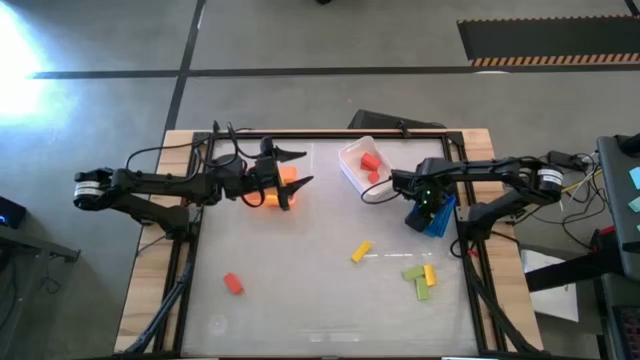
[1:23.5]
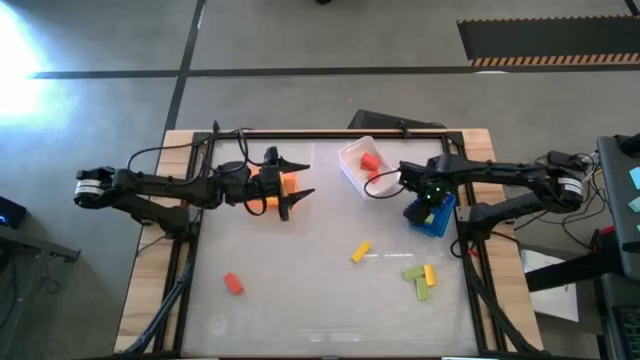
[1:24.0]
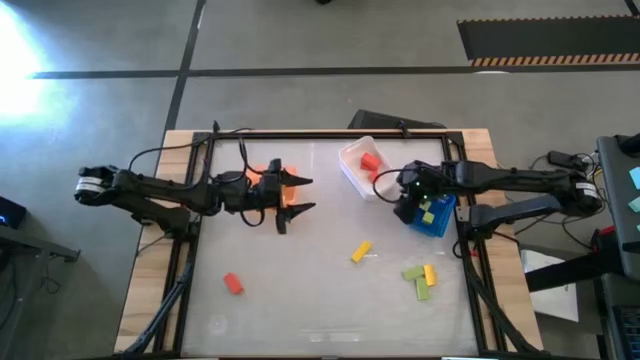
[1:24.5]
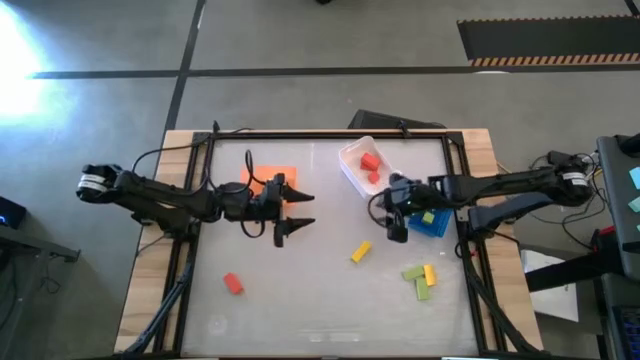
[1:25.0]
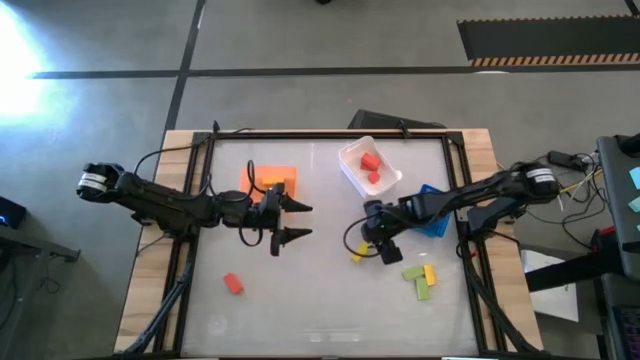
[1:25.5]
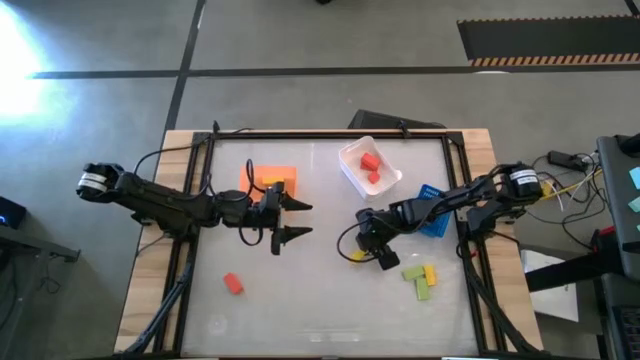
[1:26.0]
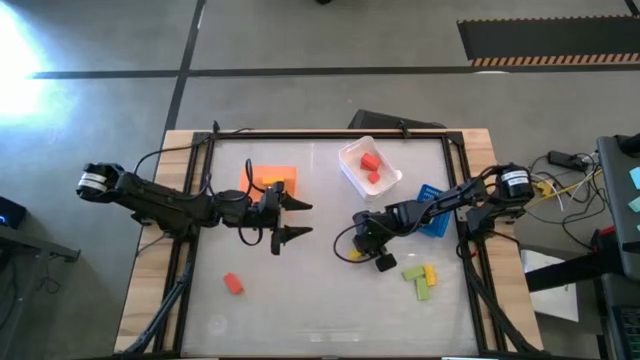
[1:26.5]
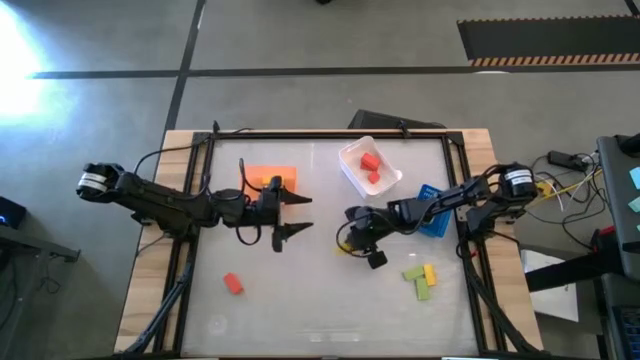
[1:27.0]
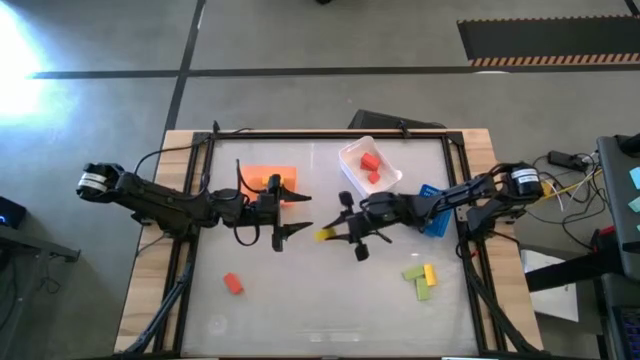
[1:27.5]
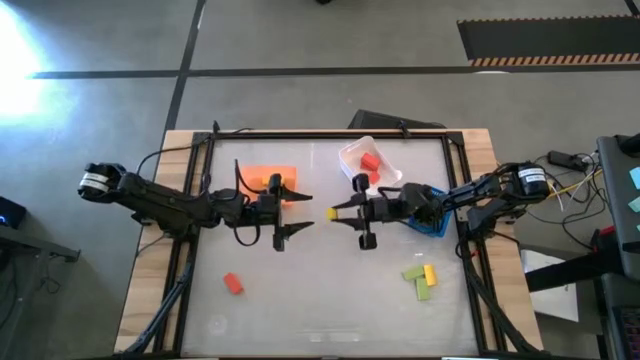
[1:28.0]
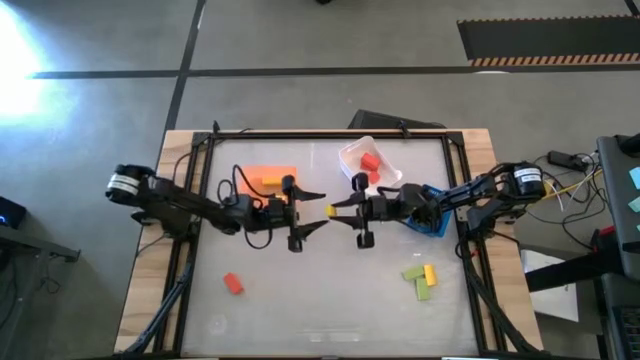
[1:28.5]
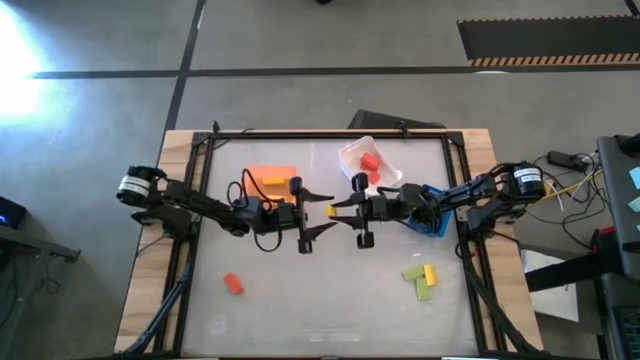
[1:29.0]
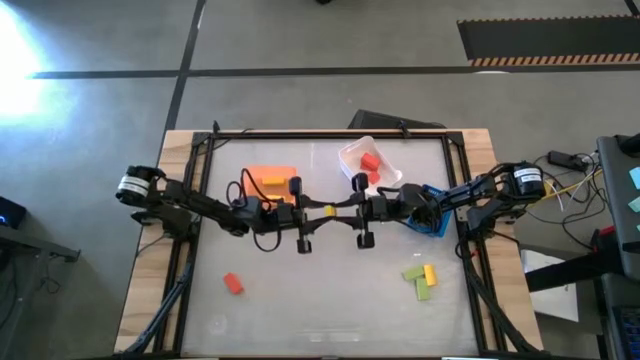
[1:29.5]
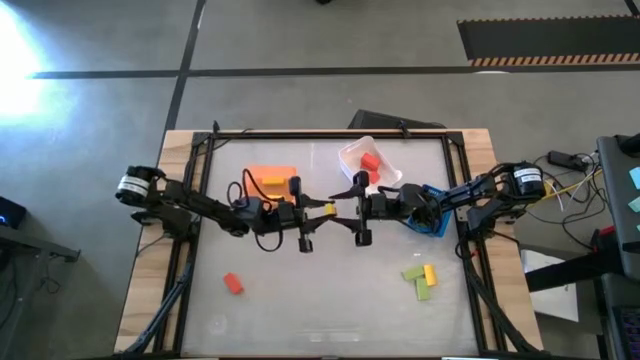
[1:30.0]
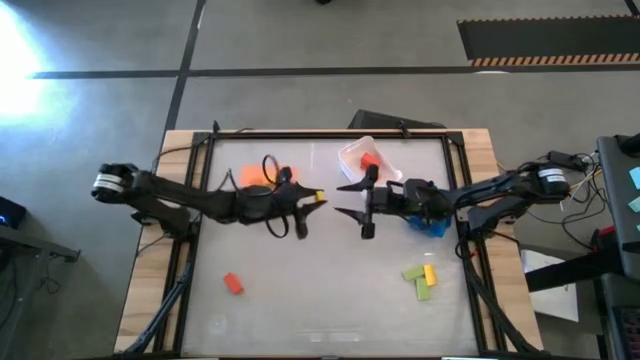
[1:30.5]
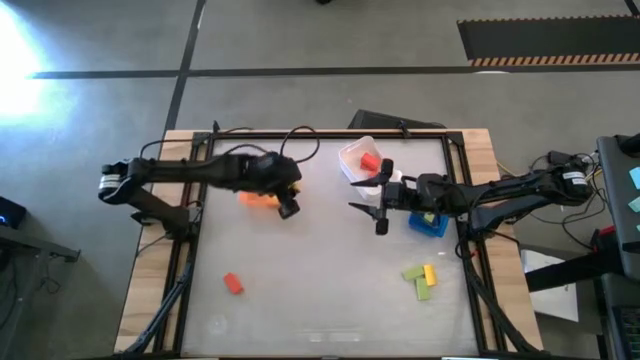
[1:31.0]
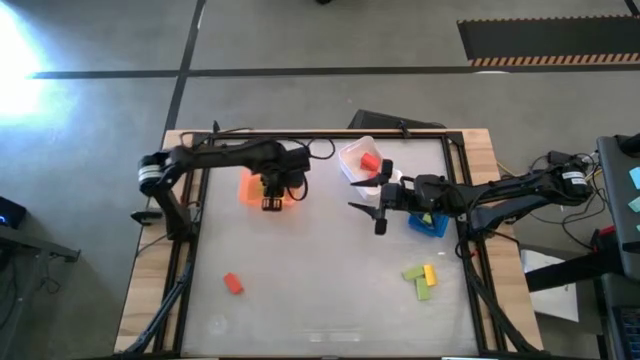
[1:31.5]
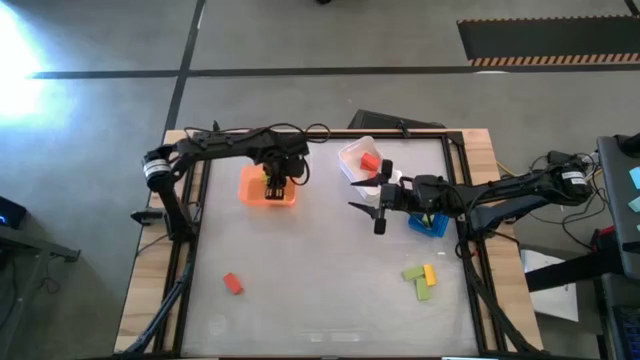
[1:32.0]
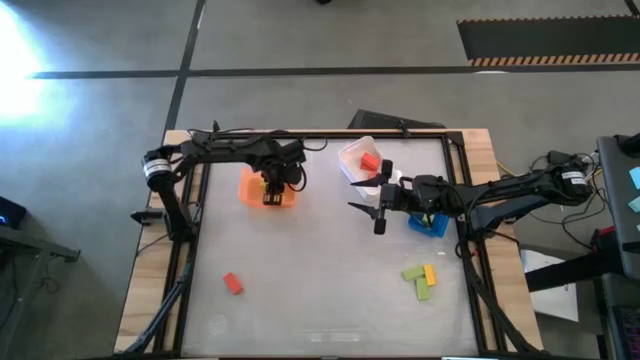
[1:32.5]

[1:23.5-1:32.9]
Task: Sort & place blocks by color
Put the yellow block into the orange bin

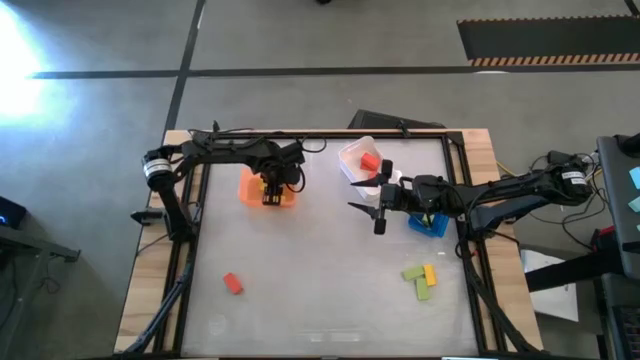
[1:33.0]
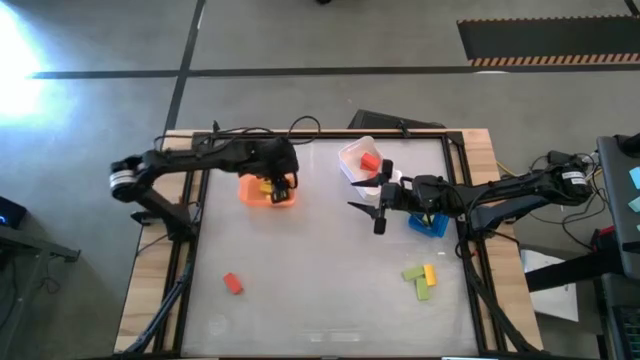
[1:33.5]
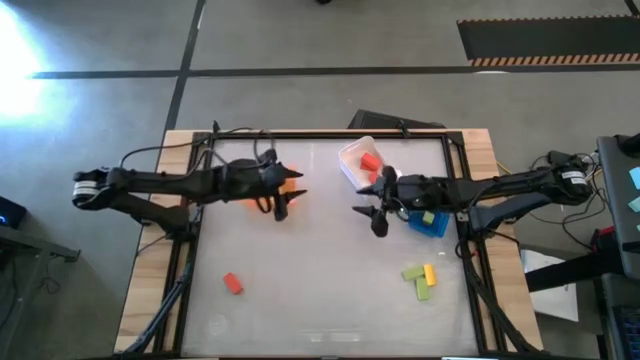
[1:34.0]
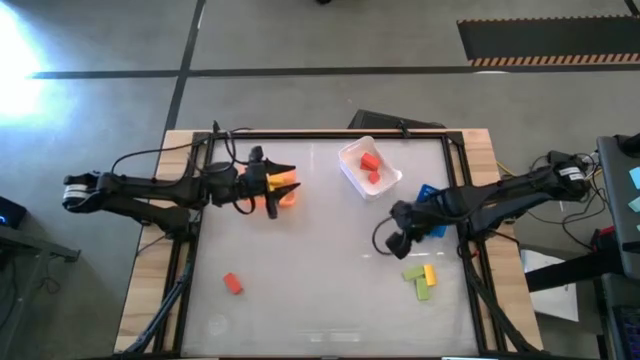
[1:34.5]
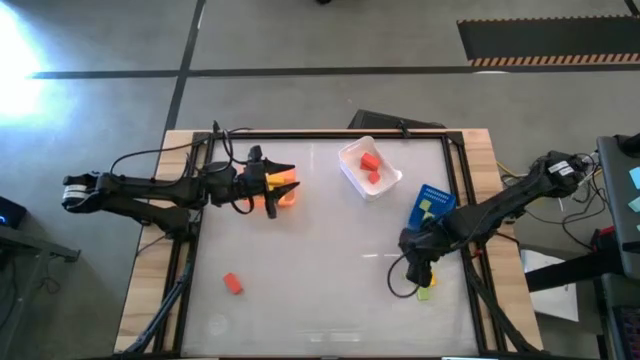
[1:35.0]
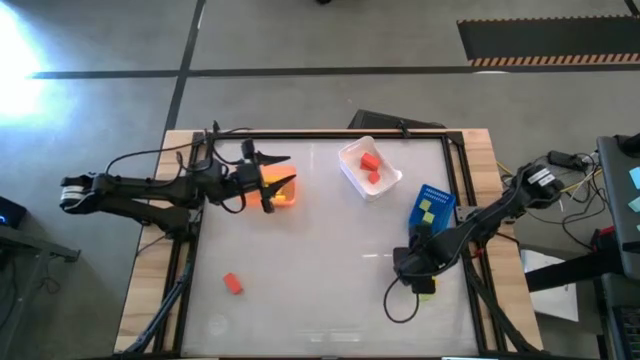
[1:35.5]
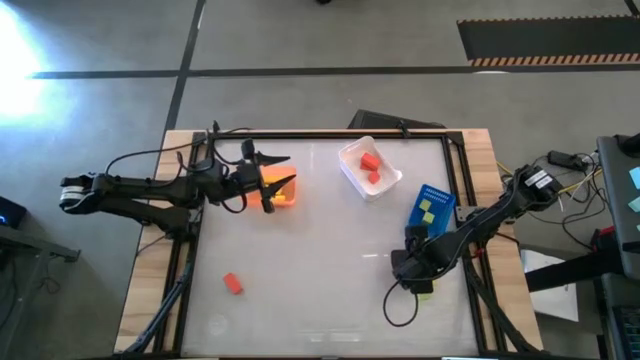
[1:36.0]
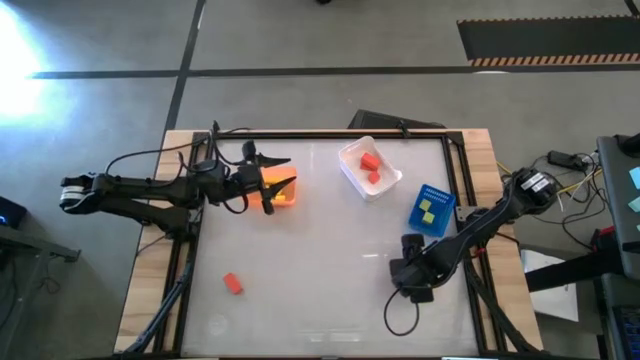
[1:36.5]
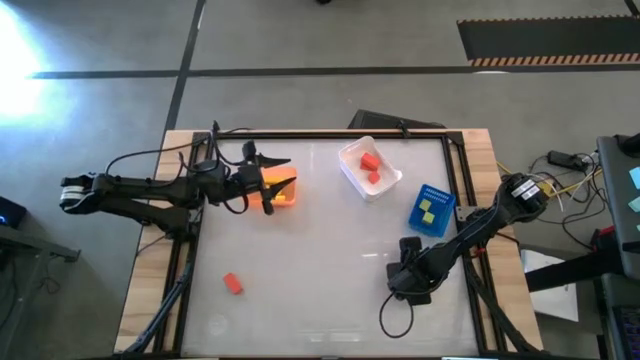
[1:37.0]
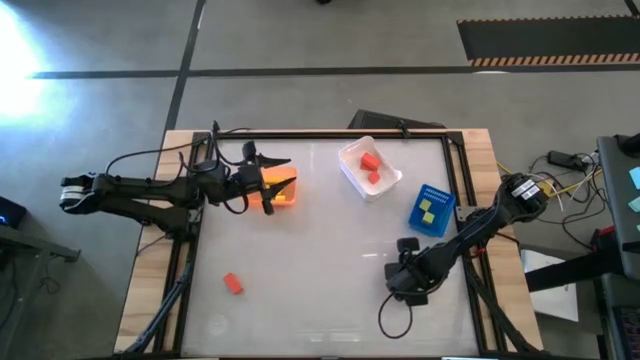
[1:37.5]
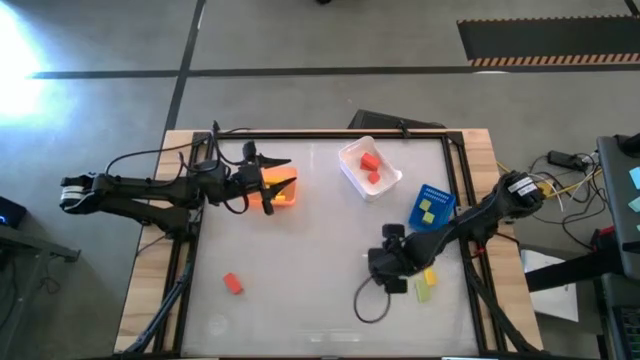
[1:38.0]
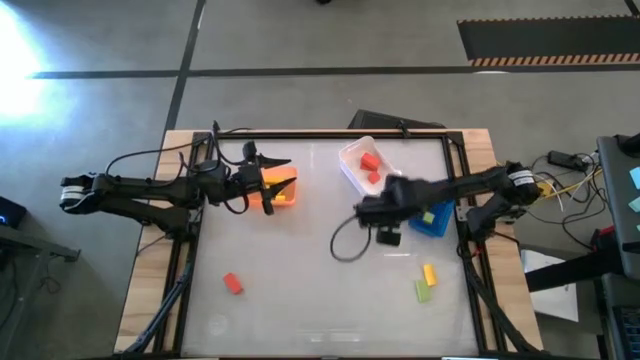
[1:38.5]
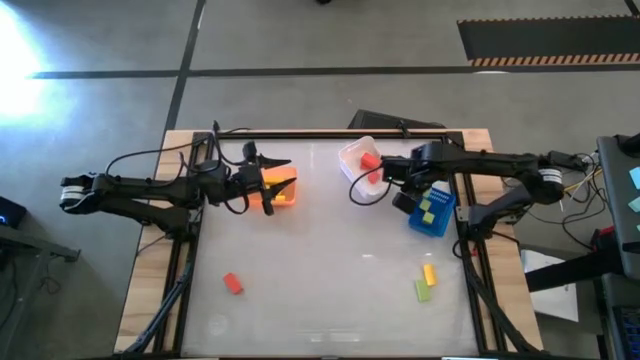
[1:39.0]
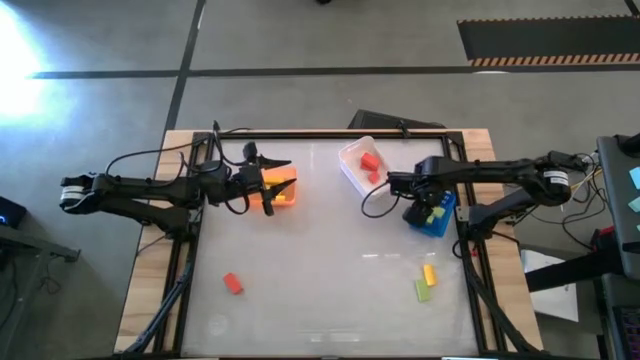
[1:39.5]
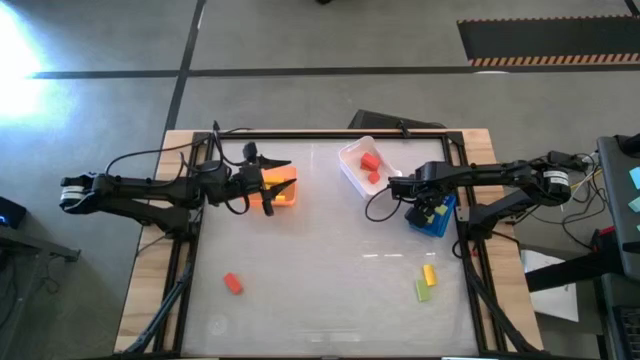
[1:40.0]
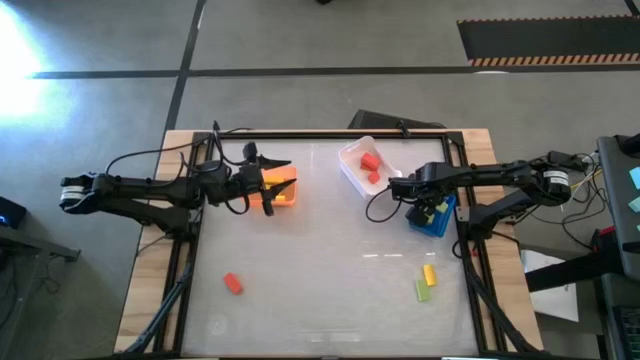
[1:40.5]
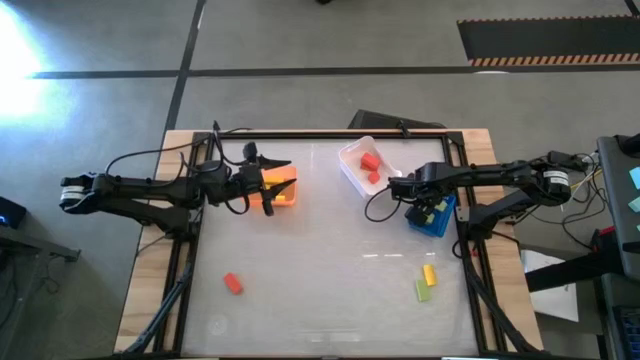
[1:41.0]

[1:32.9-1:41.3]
Put the green block into the blue bin

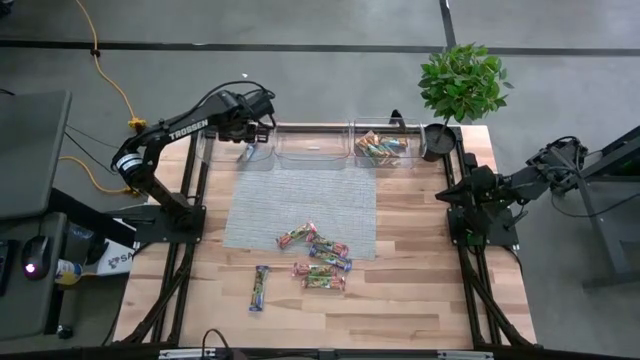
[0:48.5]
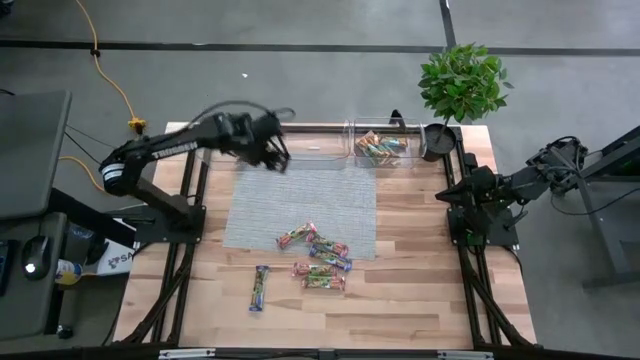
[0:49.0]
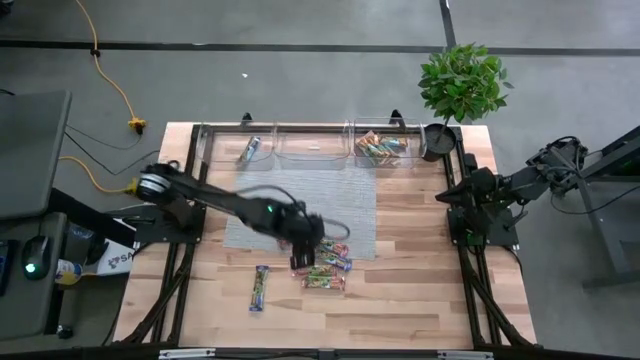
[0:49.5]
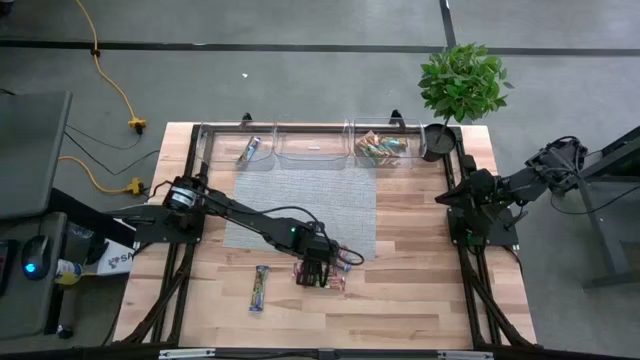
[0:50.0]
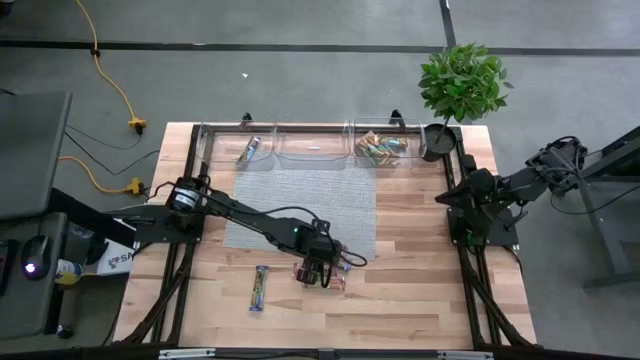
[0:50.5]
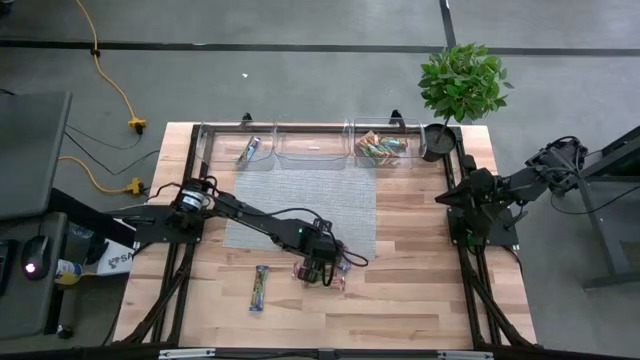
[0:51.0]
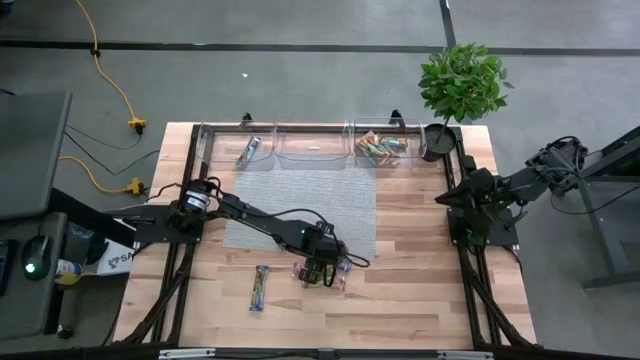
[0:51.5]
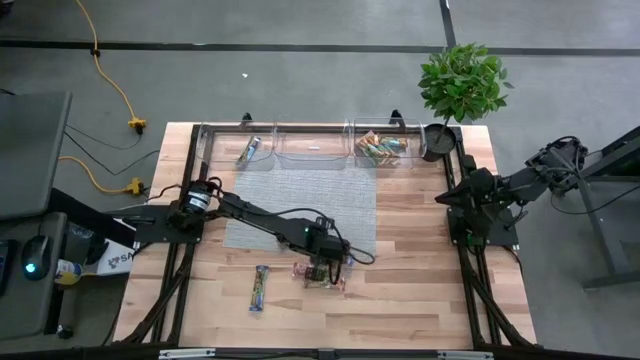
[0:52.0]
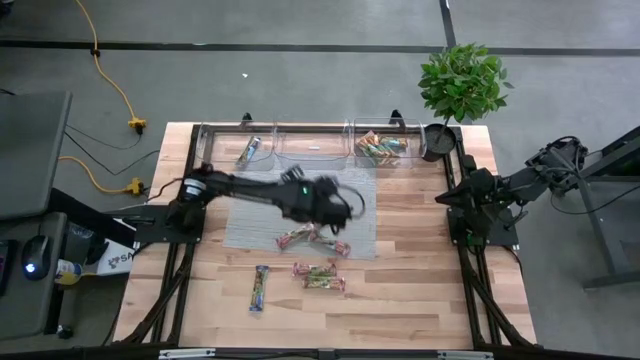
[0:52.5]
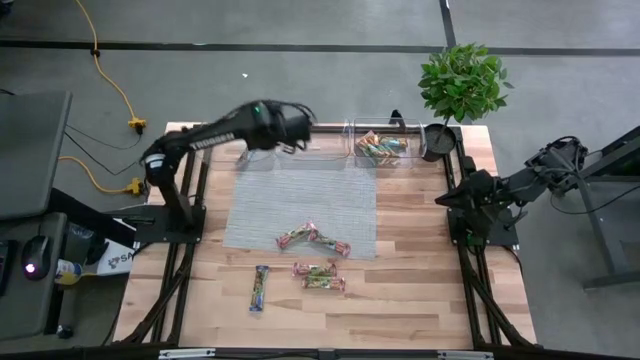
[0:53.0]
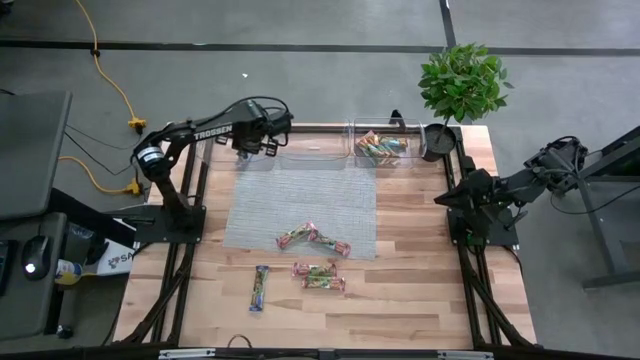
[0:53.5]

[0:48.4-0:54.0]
Task: Pick and place Granola Bars by type
Put the blue granola bar into the left transparent bin
